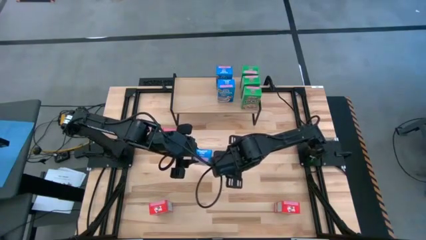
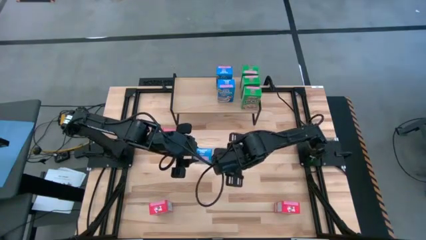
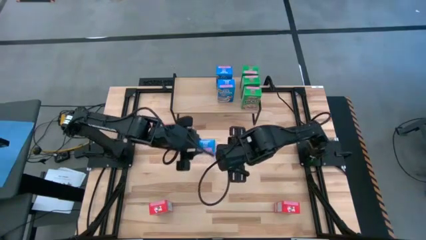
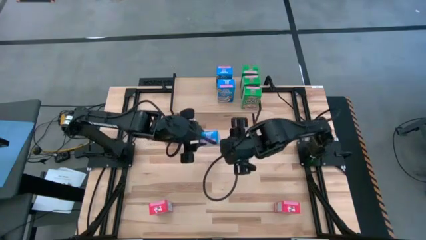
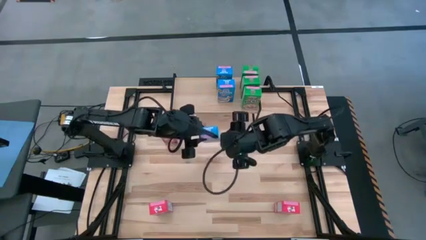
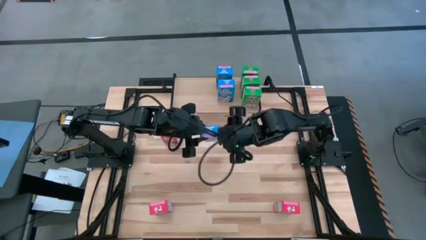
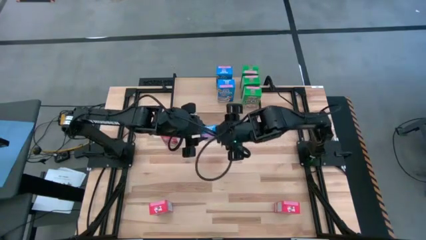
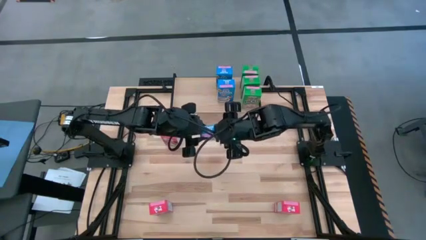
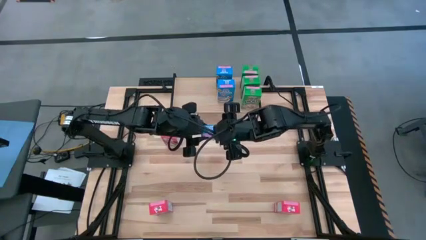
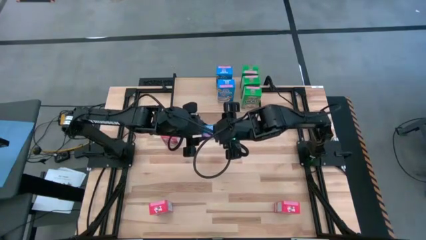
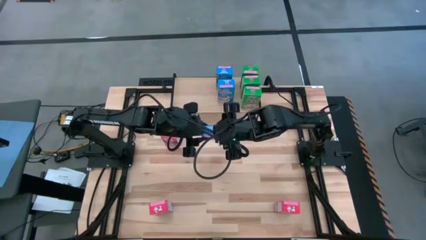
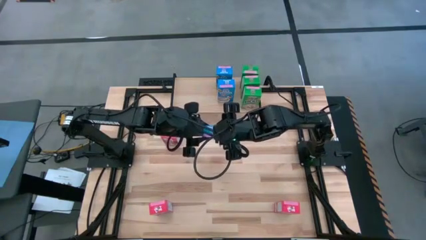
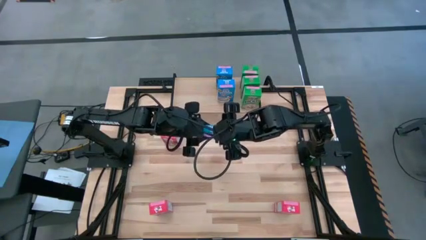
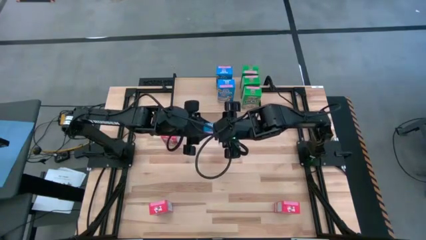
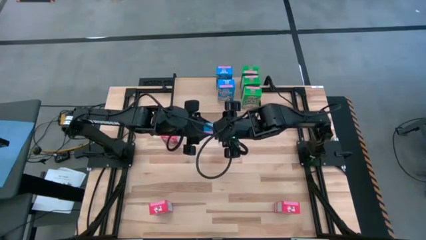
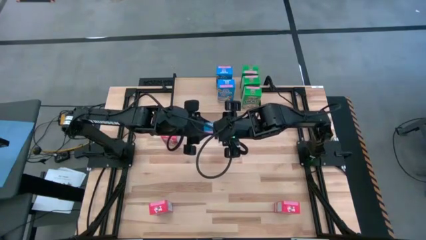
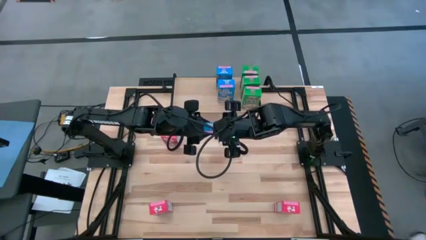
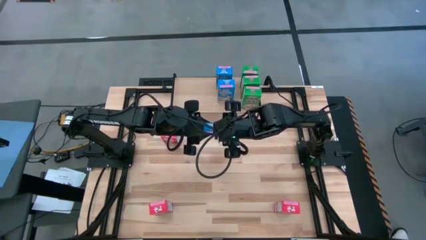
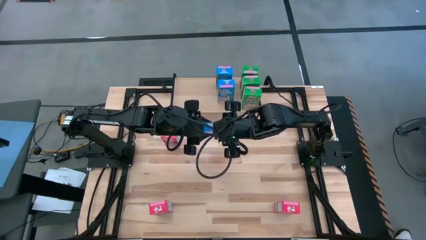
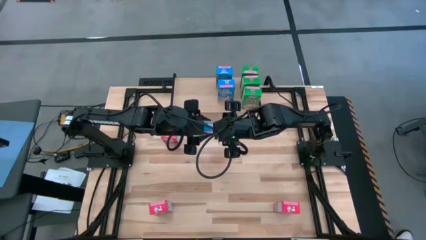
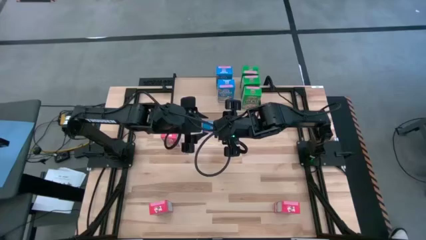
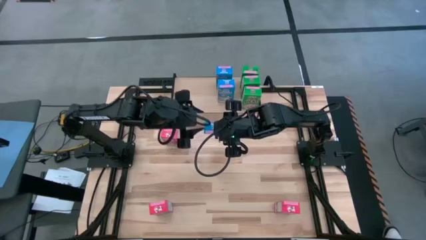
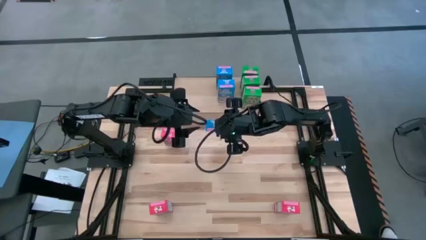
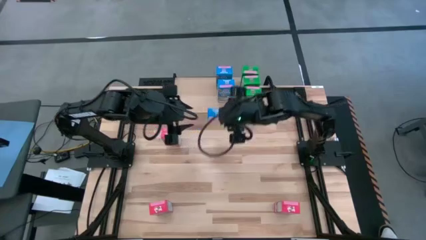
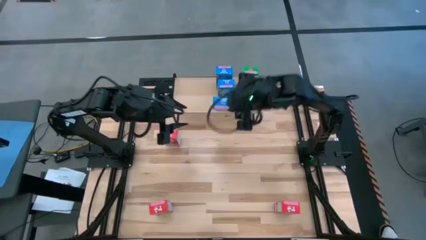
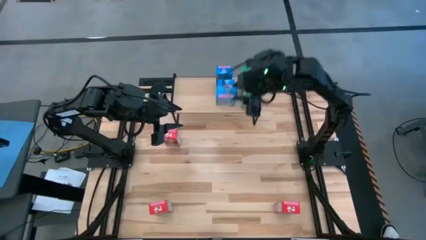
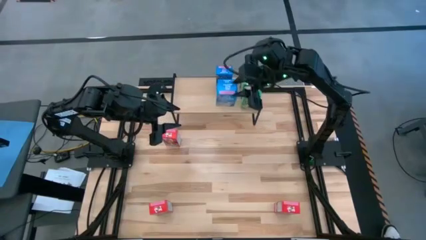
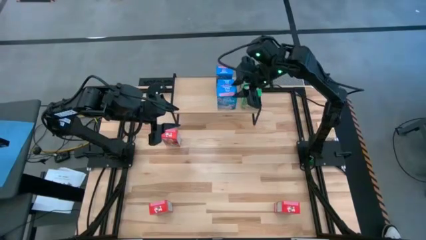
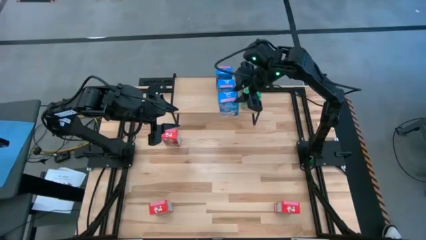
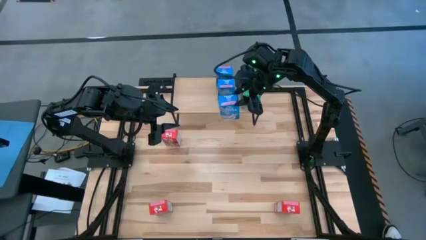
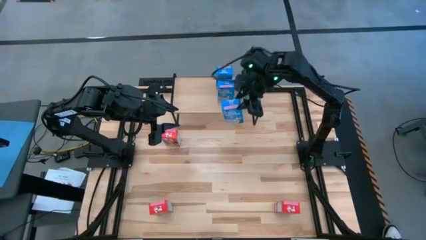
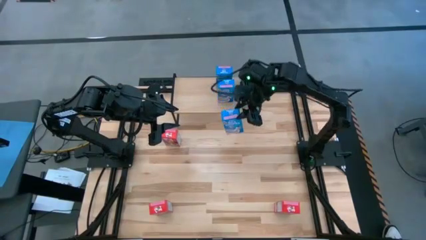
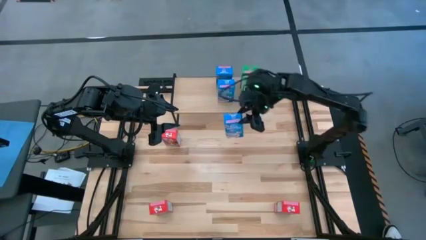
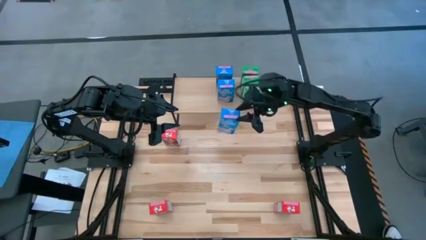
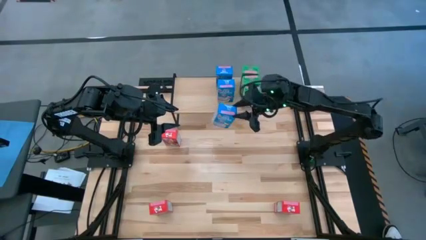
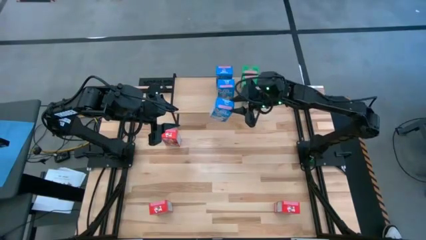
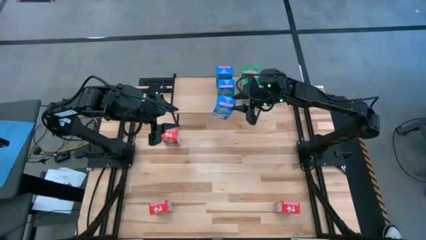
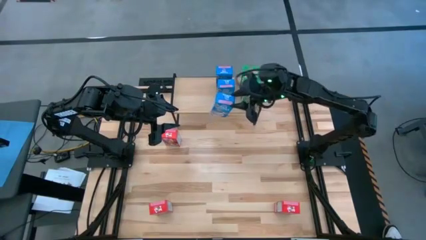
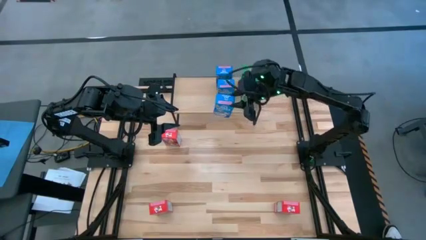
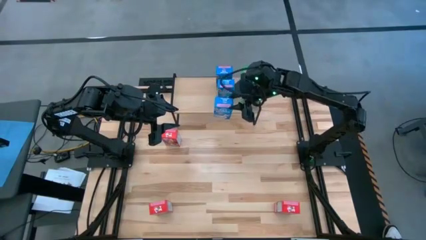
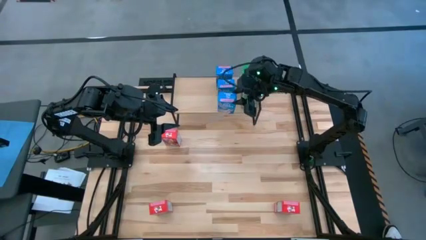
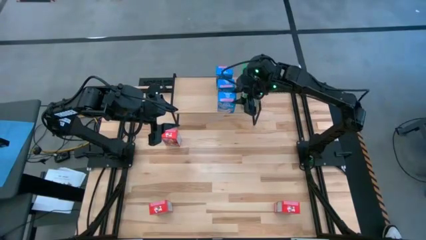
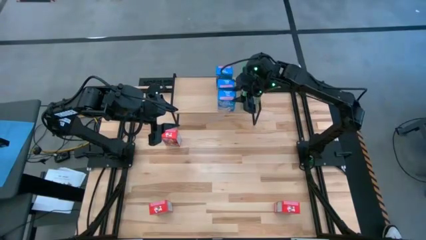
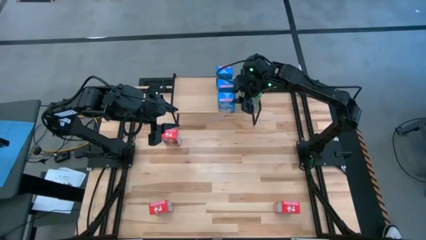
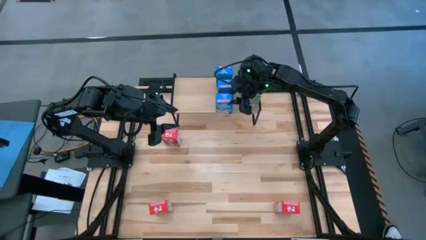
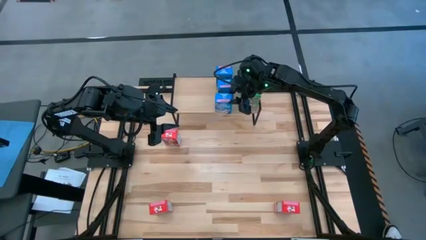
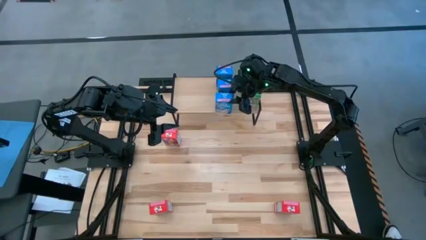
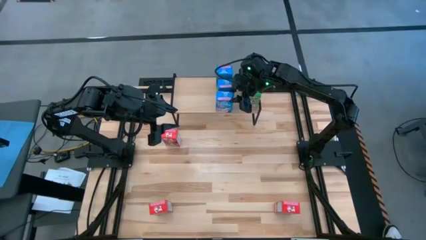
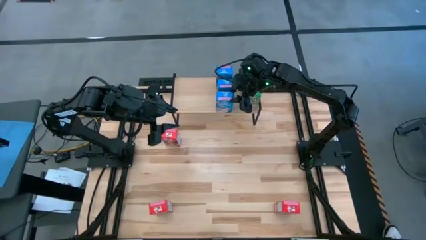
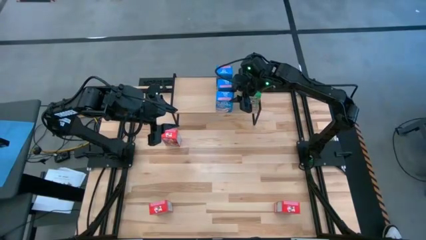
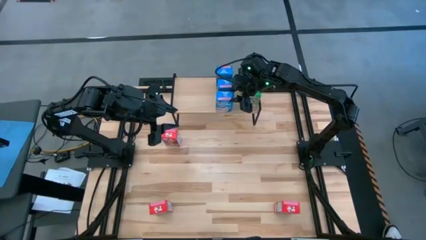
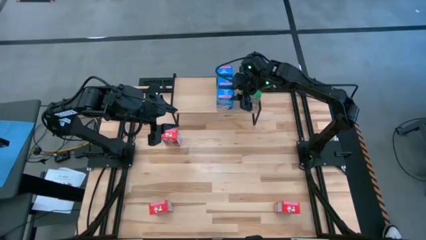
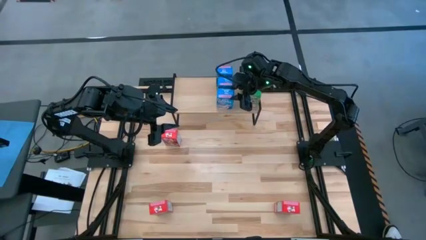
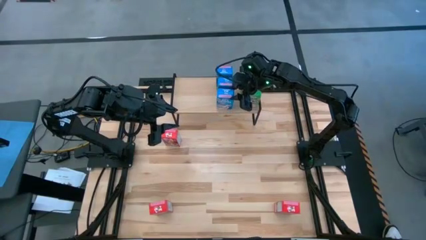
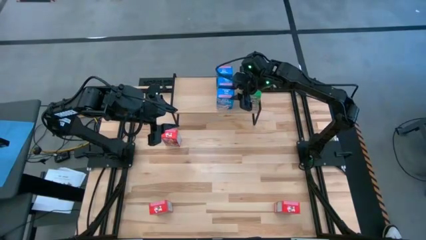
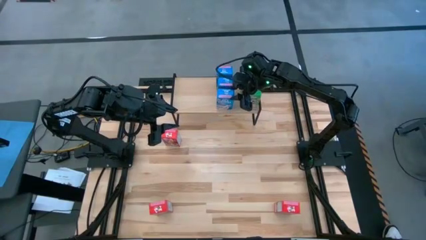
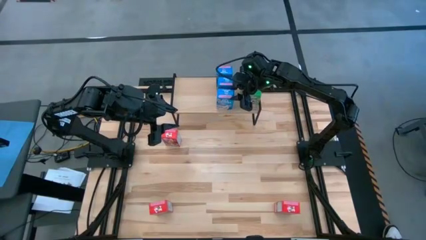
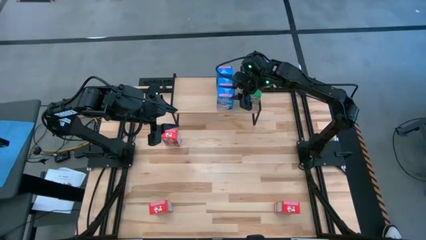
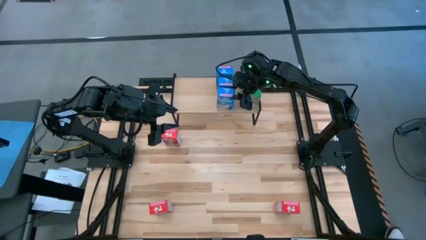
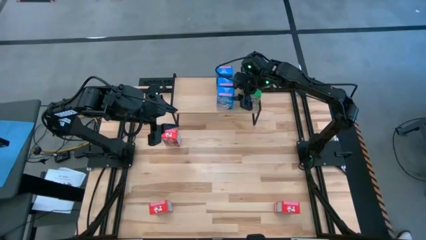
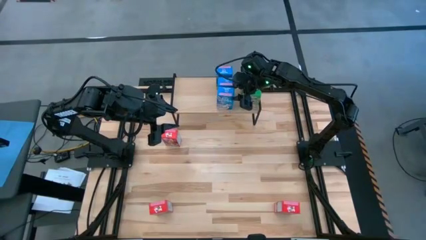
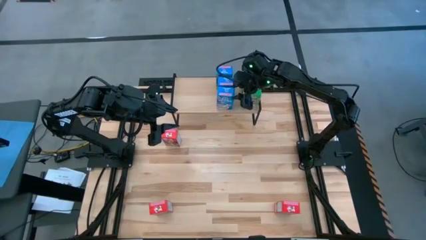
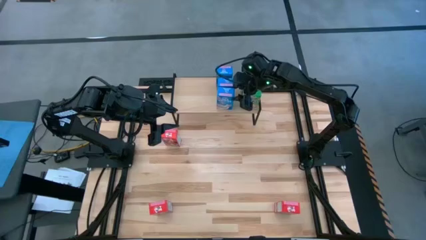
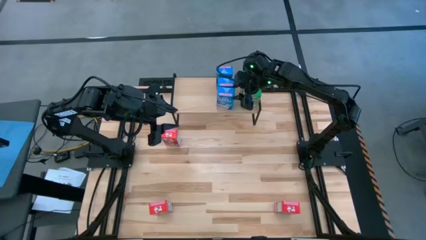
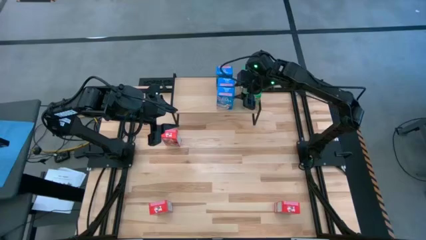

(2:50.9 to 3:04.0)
Task: Stack cereal on shelf
Put the blue cereal box on the shelf aligned with the other blue cereal box

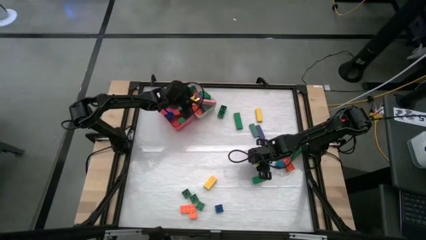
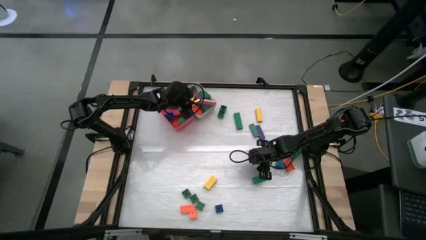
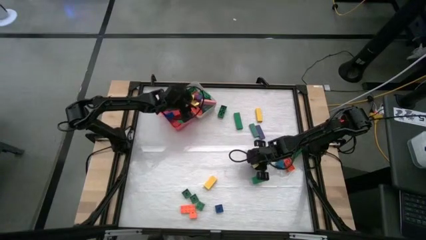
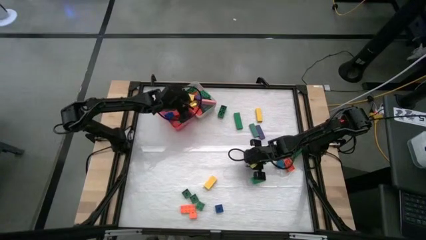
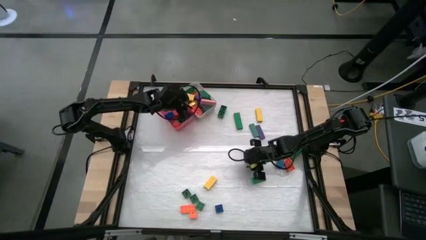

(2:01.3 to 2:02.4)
Task: Sort blocks by size
Put the small blue game piece into the pink bin

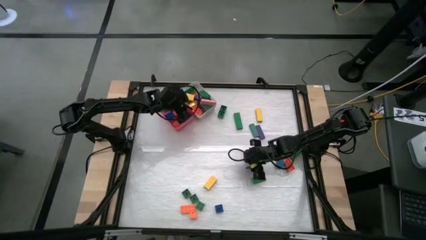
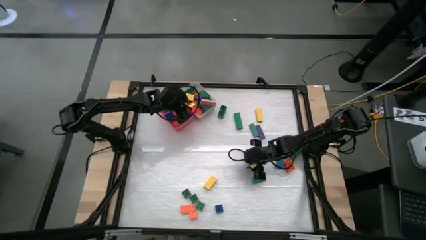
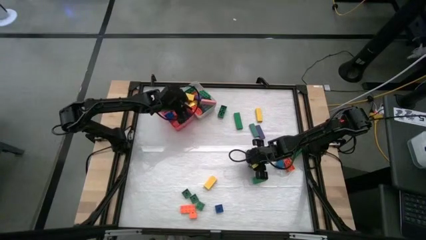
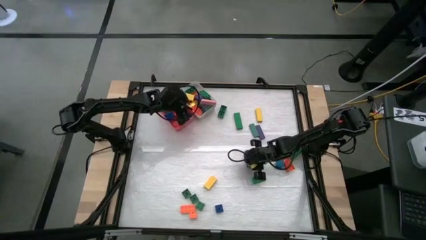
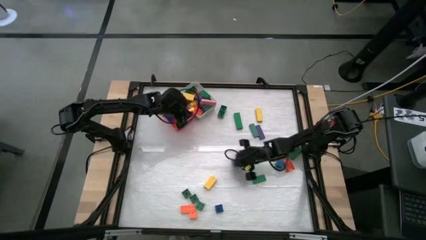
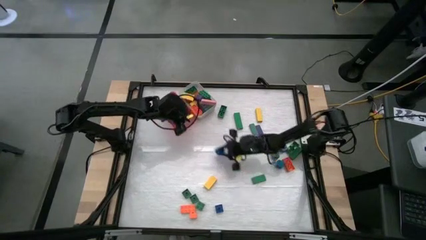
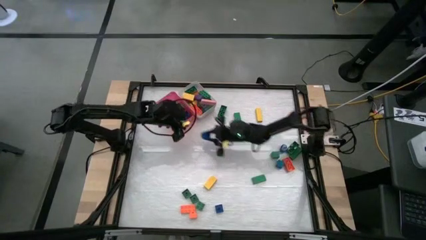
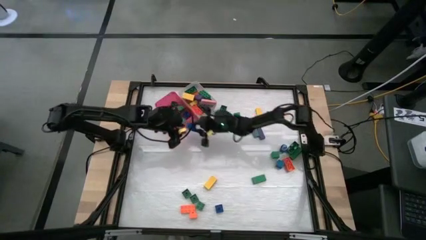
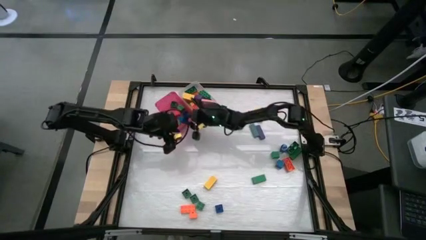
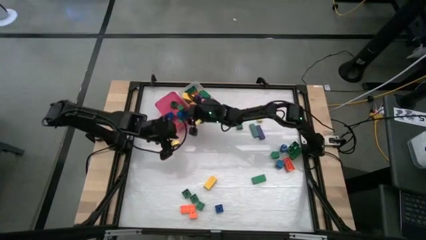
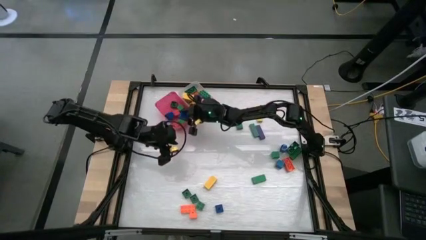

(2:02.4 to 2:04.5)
Put the small blue game piece into the pink bin
